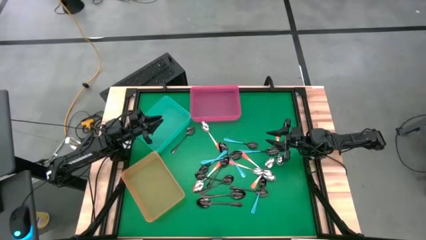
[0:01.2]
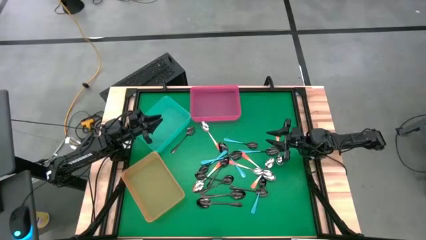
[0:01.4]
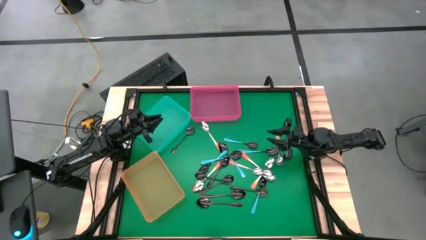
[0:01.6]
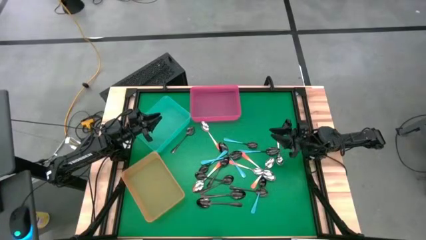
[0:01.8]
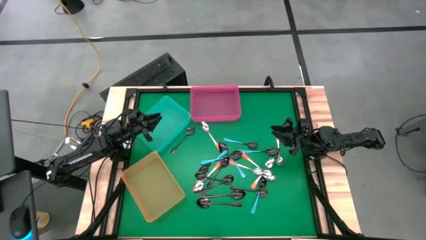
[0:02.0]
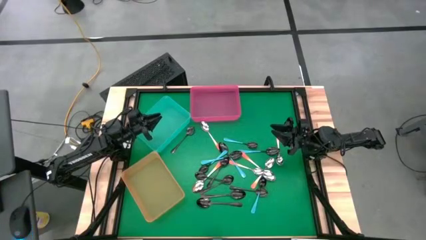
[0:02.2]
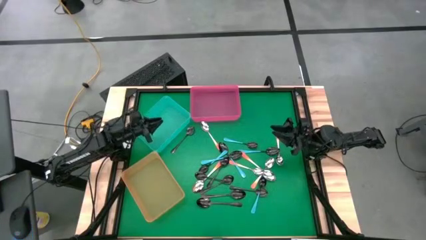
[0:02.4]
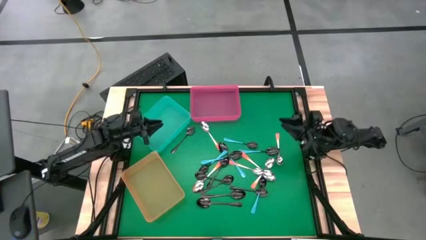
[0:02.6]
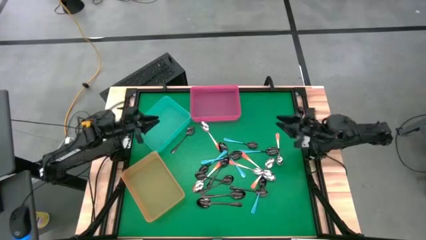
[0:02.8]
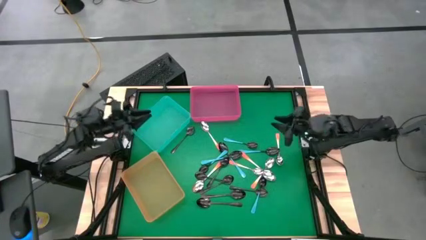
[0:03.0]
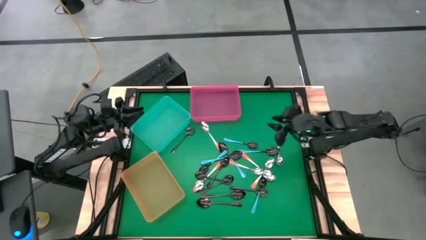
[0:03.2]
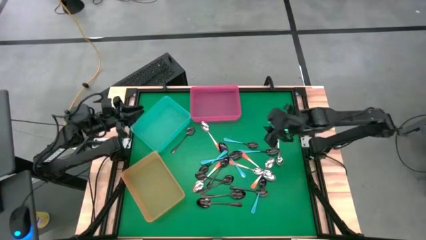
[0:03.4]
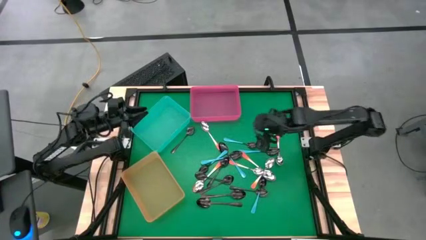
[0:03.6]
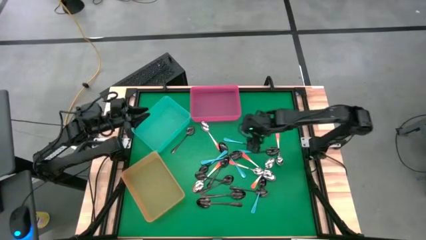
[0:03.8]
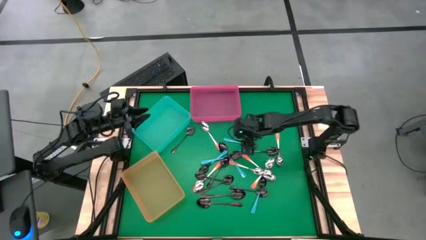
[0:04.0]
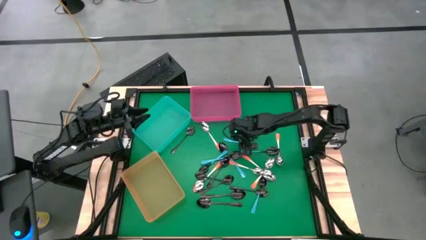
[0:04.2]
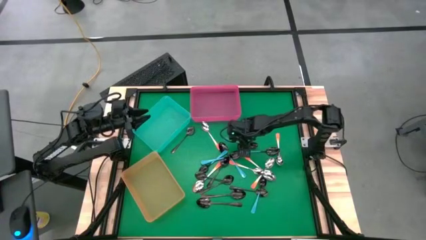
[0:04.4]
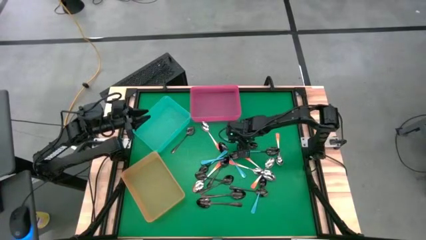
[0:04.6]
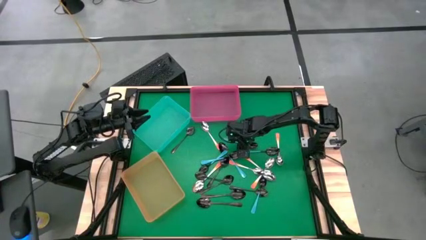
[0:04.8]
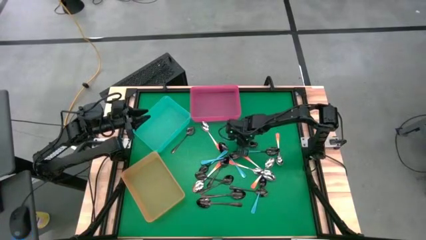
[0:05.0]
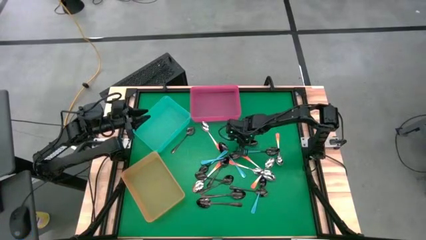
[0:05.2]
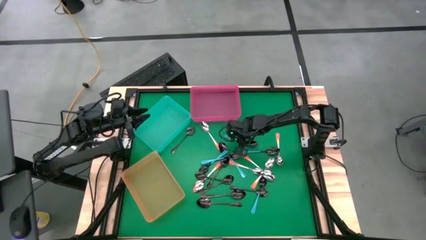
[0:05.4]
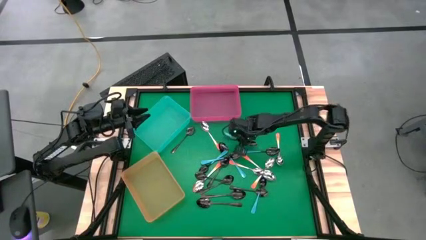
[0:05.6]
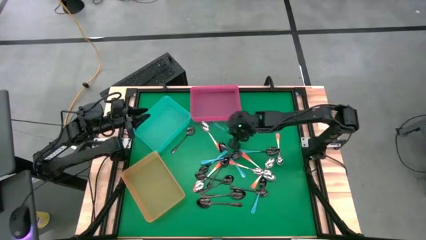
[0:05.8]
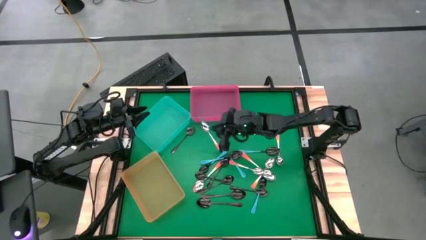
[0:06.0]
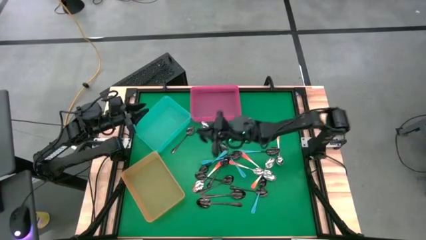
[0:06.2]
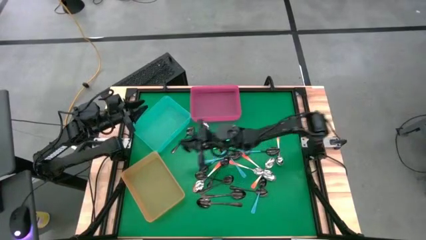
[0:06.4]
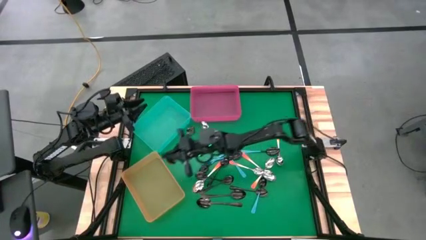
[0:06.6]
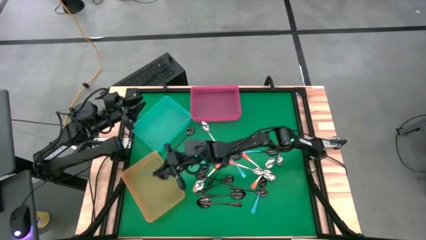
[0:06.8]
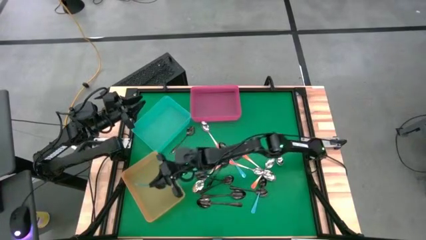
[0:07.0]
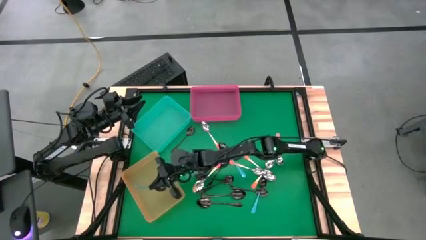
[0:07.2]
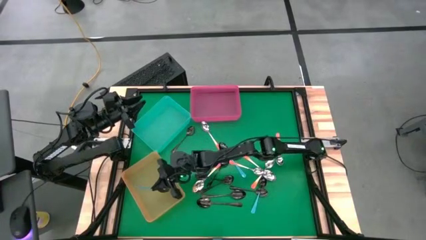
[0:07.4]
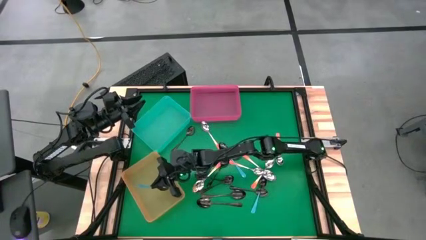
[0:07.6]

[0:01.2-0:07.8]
Task: Sort silverware by color (type)
Put the blue spoon into the orange bin

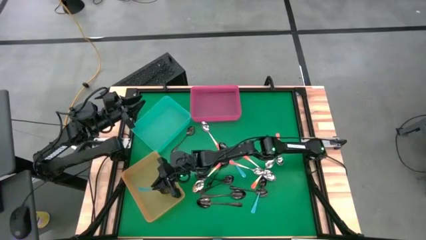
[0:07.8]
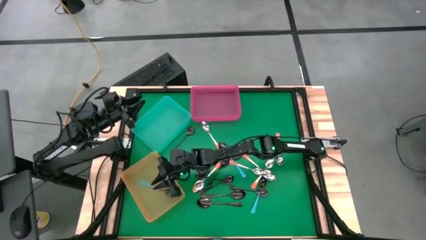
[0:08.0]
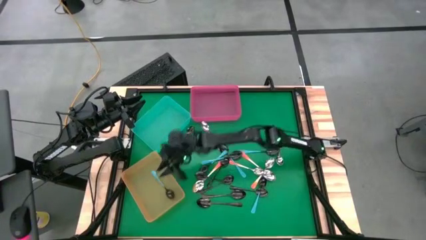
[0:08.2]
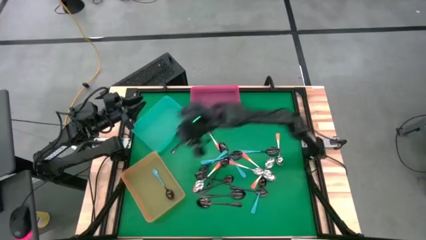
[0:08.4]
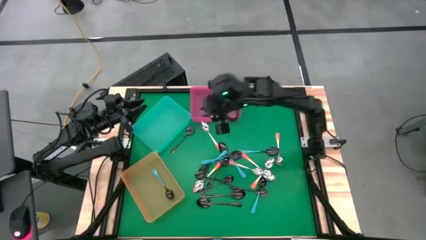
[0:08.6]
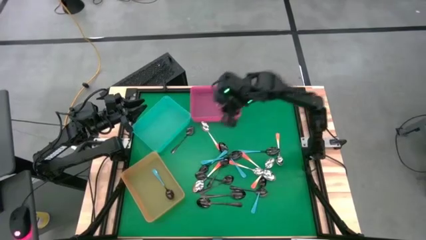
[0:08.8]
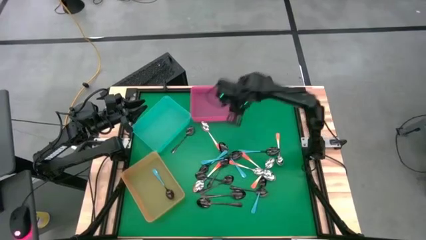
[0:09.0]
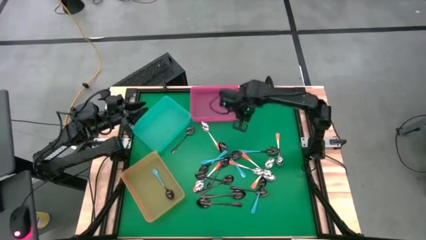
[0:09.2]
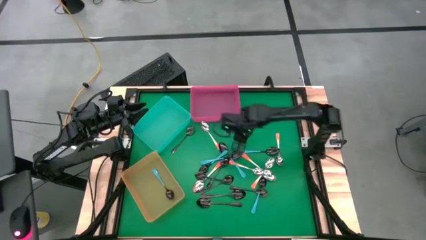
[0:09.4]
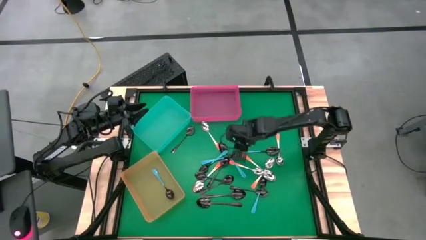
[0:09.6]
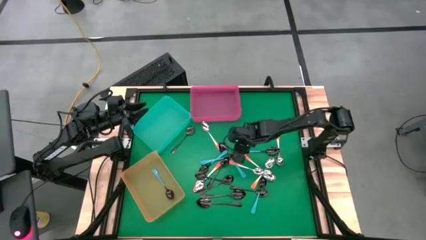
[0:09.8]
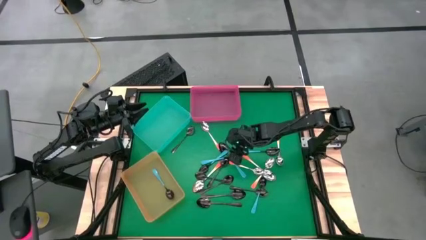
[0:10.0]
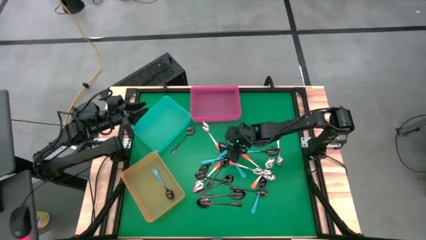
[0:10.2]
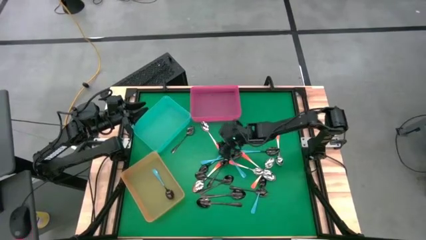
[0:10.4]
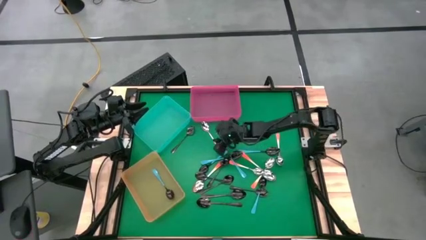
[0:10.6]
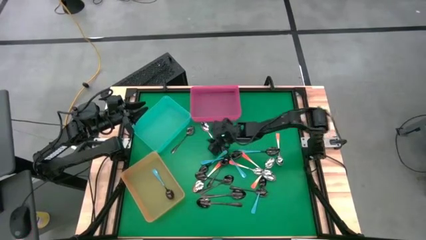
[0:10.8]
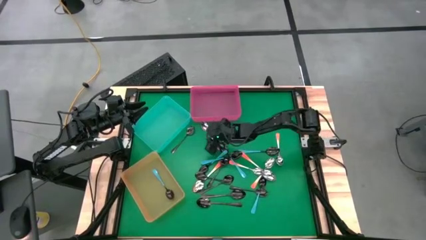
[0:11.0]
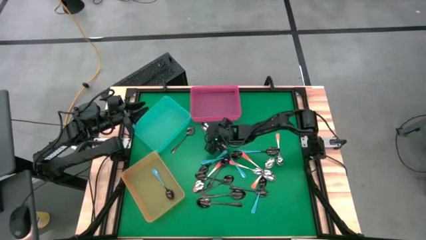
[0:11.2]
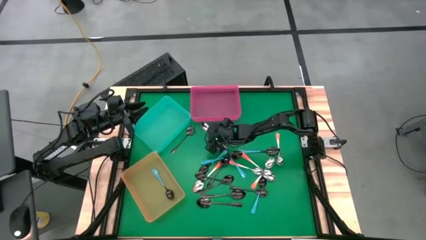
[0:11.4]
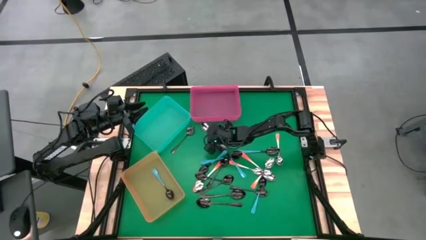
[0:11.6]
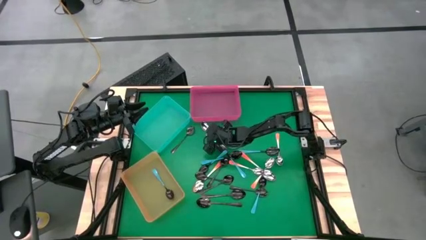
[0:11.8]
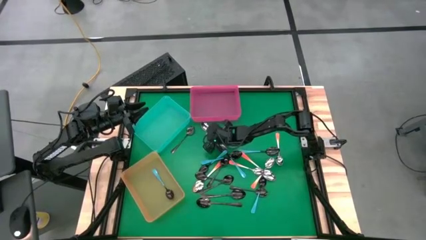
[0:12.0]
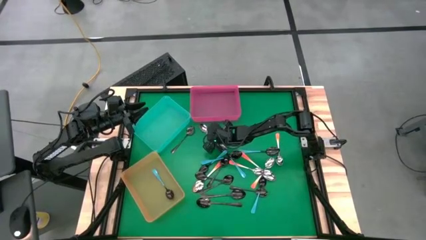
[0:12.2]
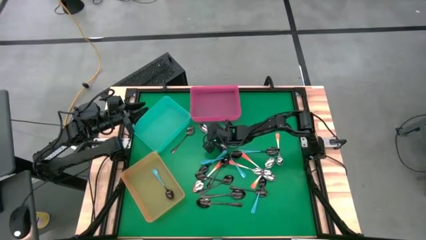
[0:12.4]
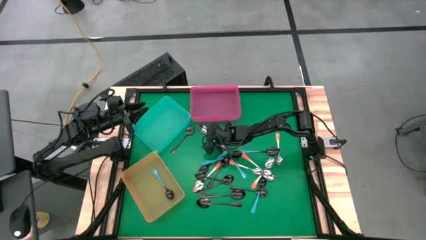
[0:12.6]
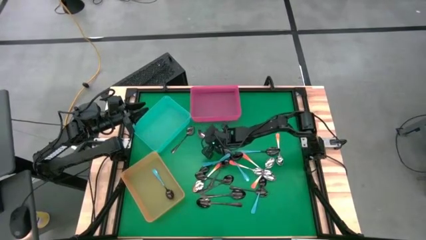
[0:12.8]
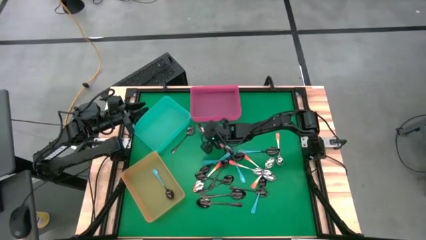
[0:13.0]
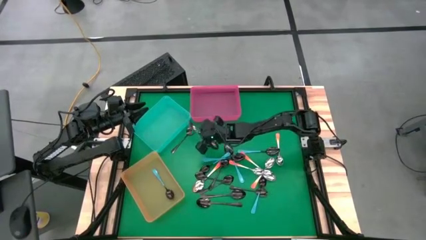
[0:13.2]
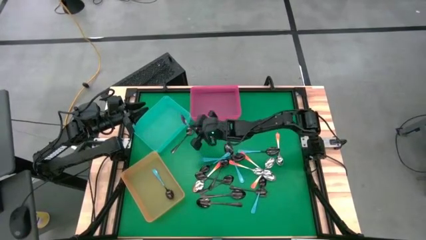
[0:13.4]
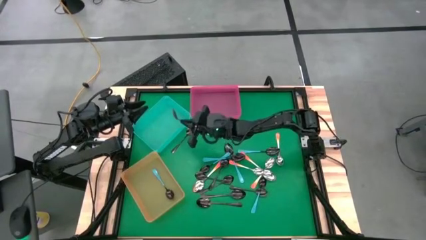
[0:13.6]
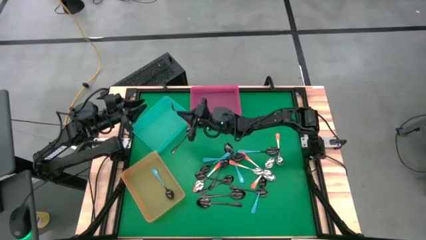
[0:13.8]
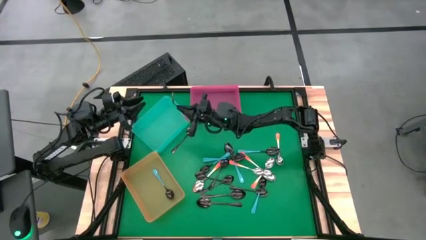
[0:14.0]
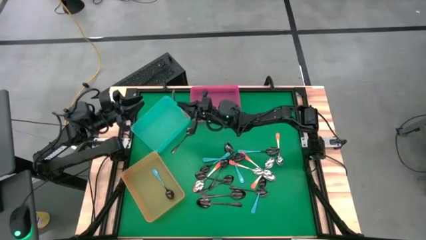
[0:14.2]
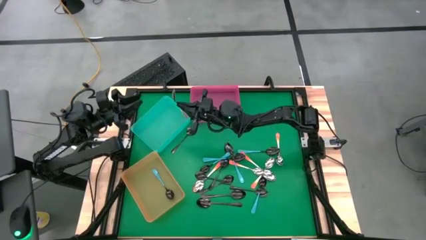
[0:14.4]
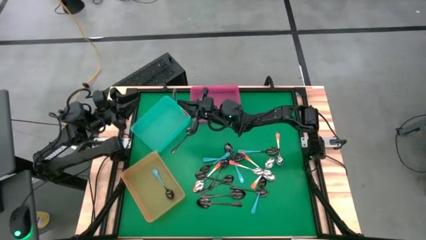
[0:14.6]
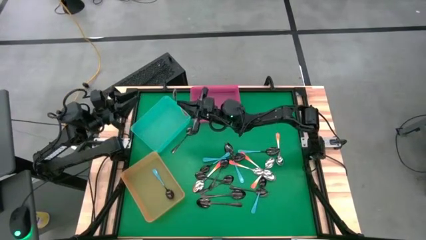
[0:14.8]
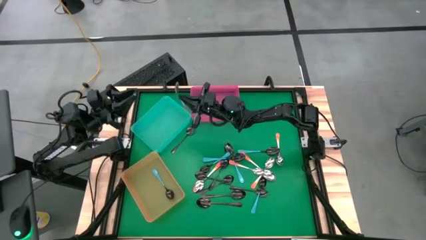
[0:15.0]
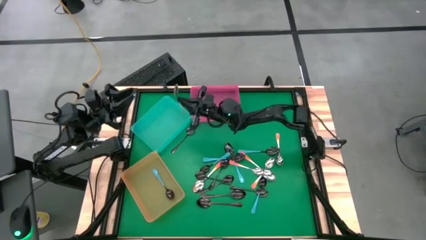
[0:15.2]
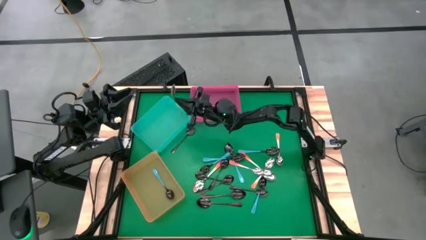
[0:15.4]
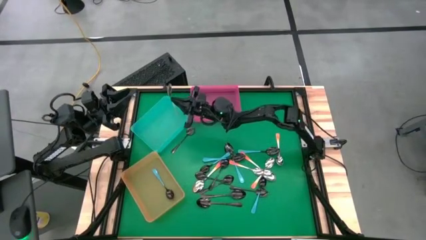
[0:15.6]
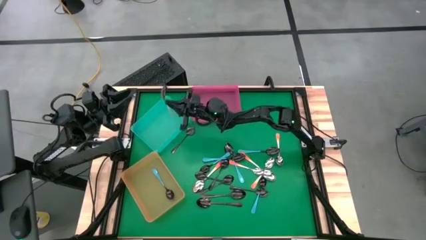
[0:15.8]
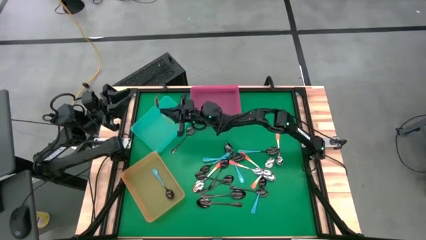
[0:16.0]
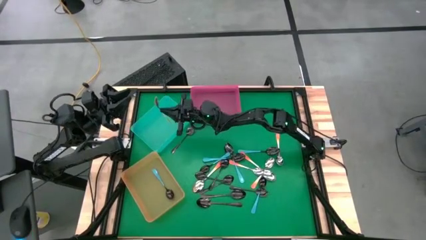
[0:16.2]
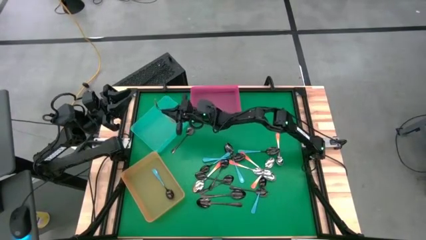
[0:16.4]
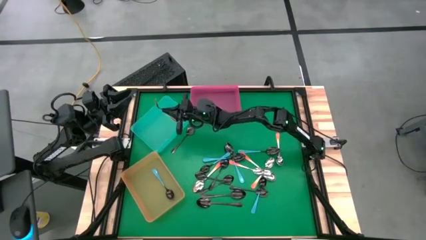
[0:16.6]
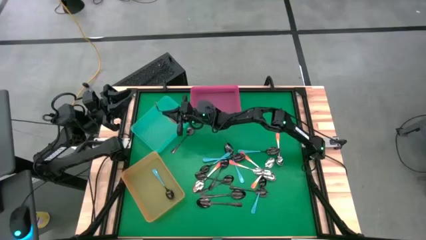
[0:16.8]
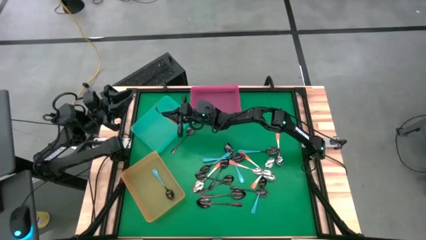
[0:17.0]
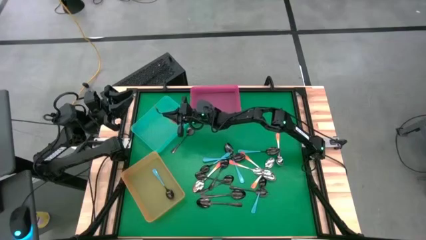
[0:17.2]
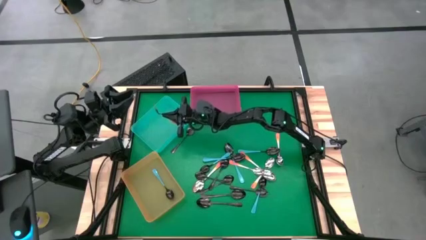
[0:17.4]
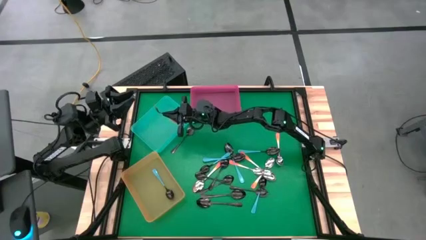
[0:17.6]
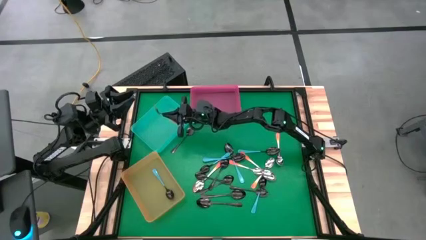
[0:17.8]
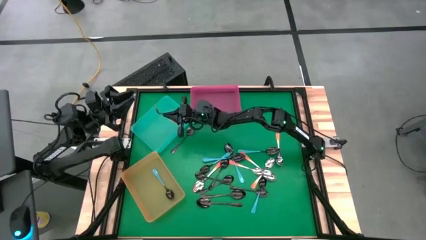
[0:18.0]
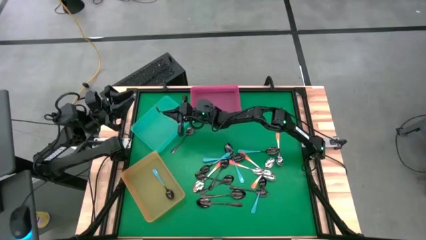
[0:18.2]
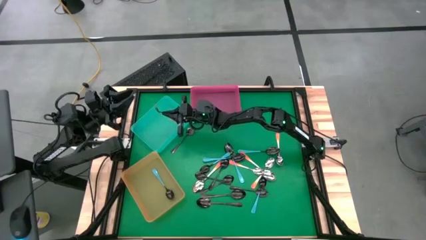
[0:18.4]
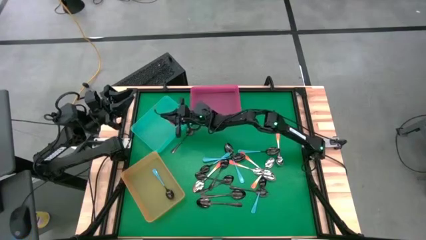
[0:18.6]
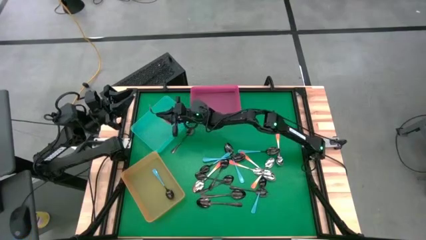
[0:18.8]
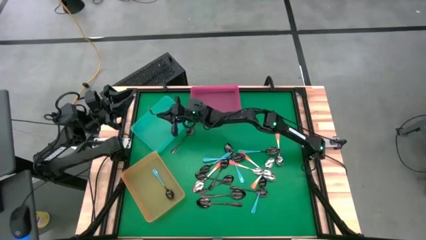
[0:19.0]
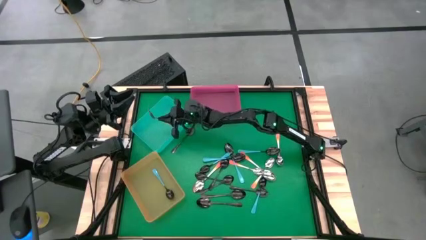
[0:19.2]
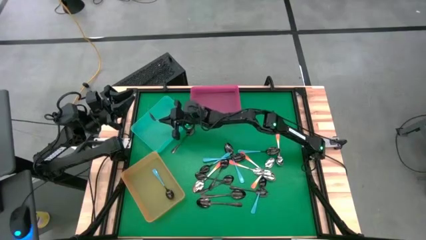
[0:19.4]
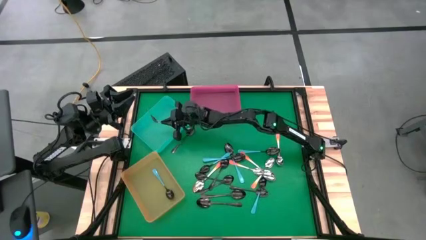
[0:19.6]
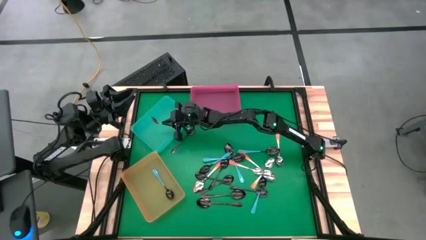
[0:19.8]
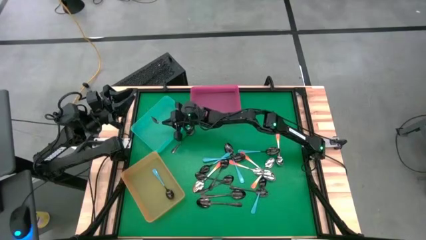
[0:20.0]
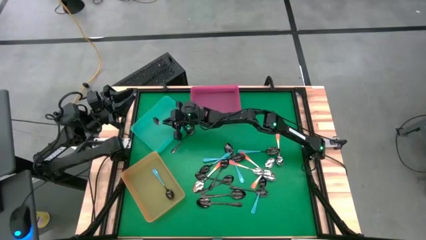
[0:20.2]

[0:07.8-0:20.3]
Put the orange spoon into the blue bin
